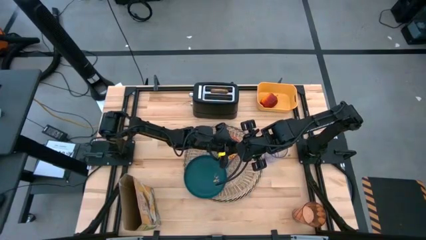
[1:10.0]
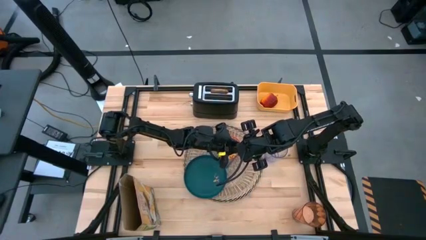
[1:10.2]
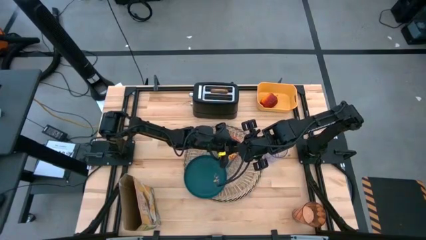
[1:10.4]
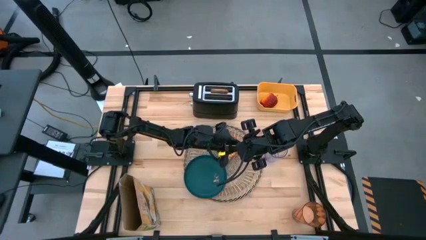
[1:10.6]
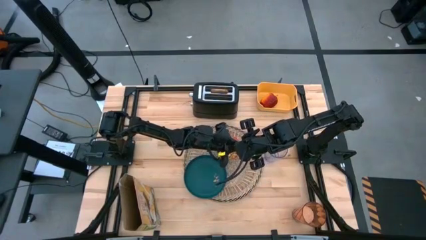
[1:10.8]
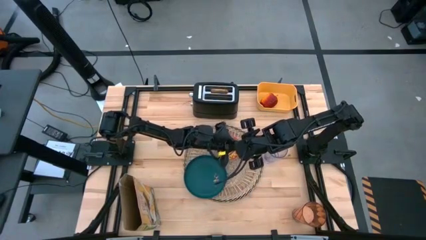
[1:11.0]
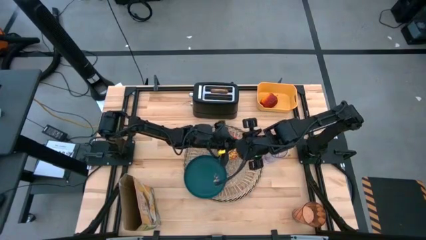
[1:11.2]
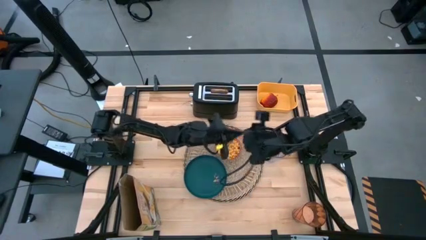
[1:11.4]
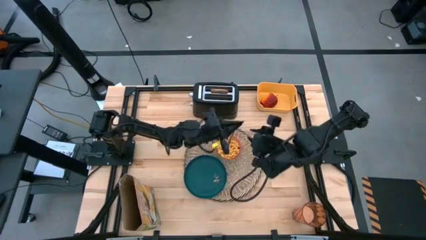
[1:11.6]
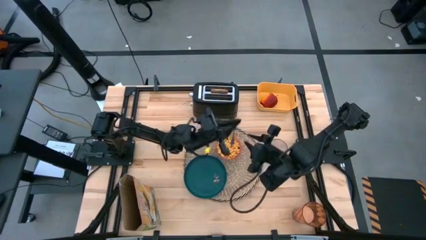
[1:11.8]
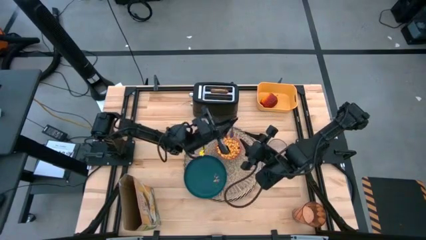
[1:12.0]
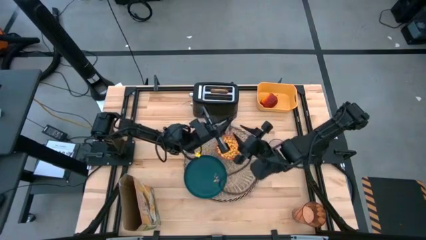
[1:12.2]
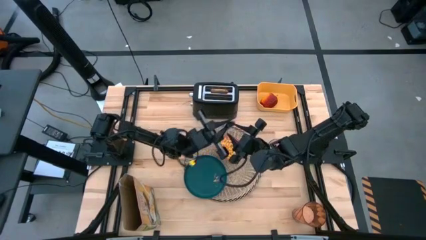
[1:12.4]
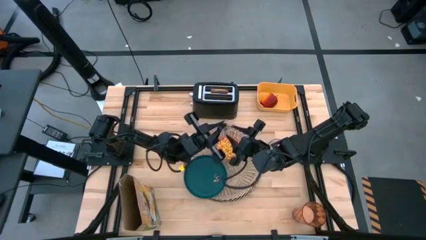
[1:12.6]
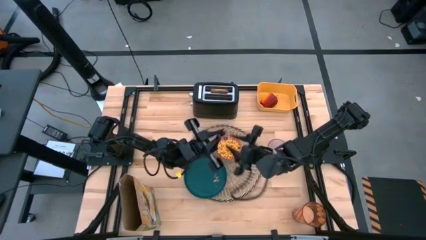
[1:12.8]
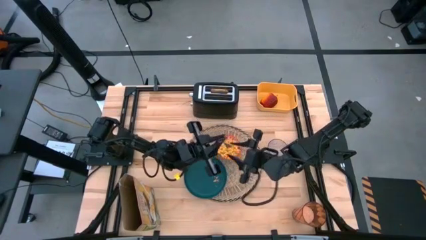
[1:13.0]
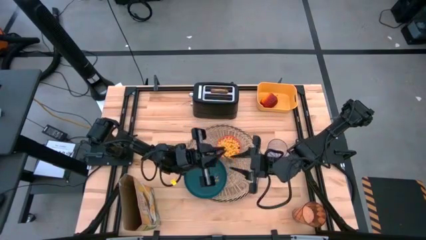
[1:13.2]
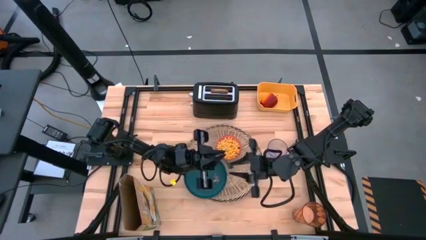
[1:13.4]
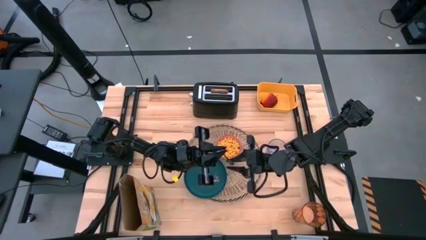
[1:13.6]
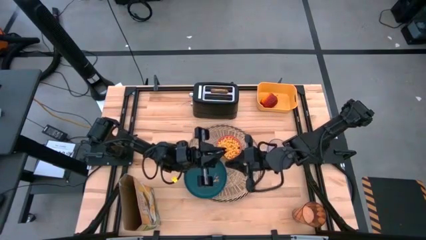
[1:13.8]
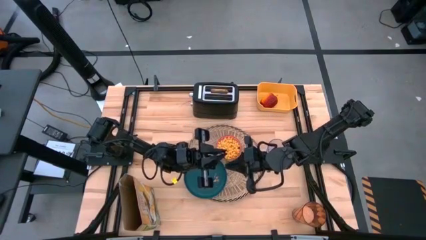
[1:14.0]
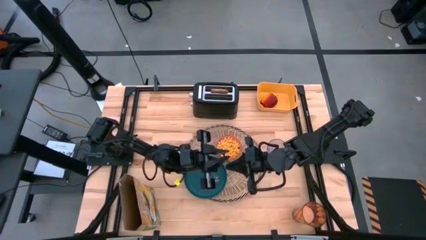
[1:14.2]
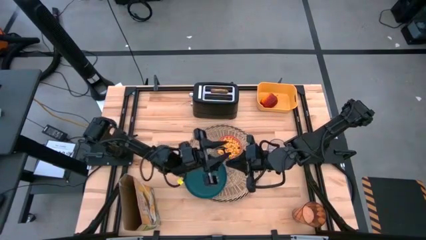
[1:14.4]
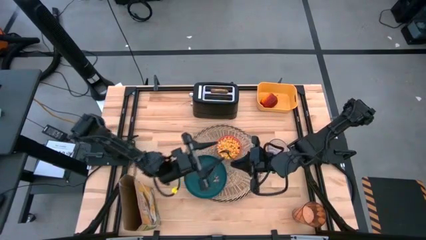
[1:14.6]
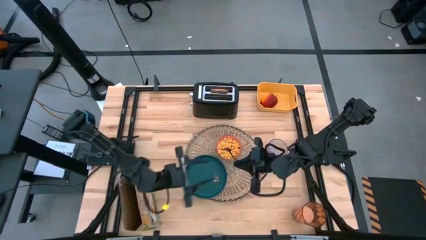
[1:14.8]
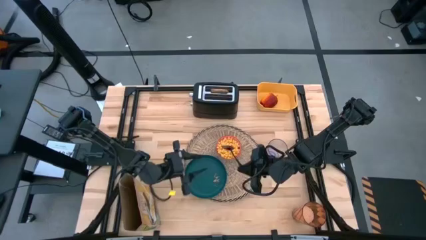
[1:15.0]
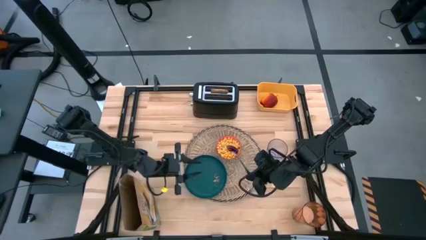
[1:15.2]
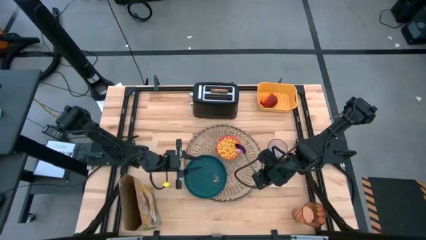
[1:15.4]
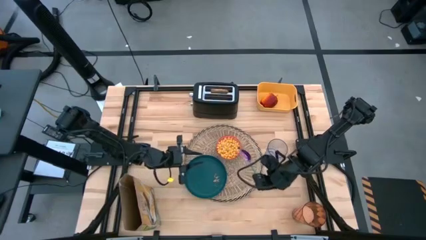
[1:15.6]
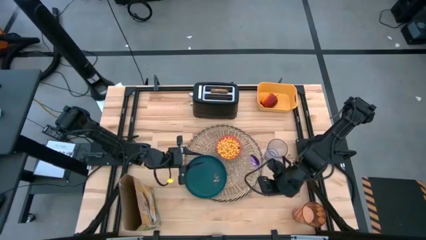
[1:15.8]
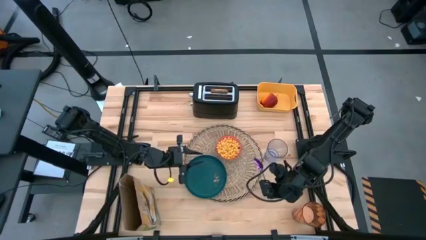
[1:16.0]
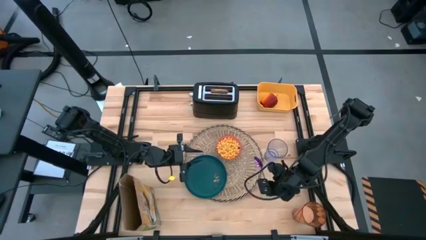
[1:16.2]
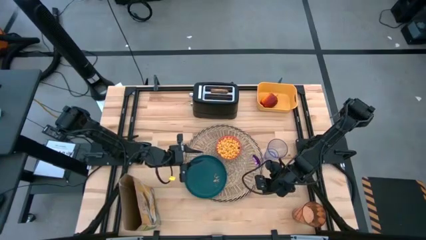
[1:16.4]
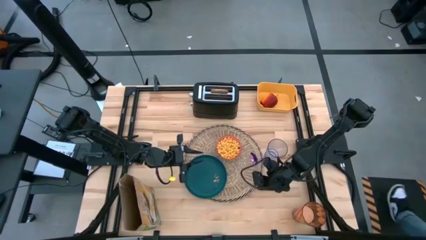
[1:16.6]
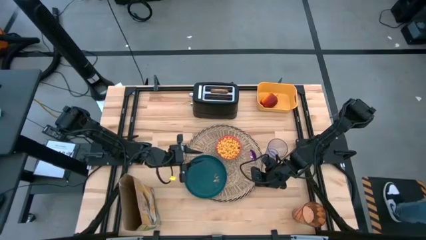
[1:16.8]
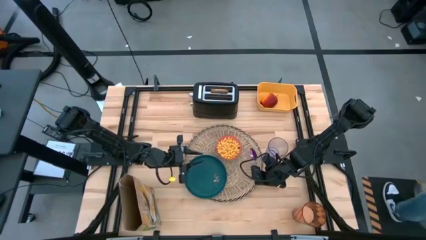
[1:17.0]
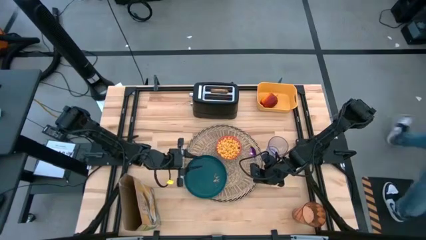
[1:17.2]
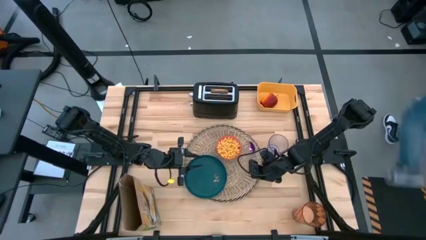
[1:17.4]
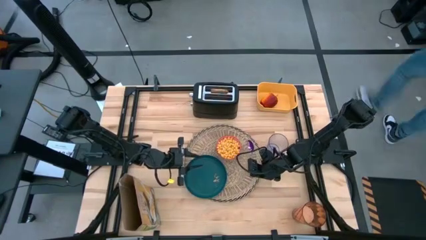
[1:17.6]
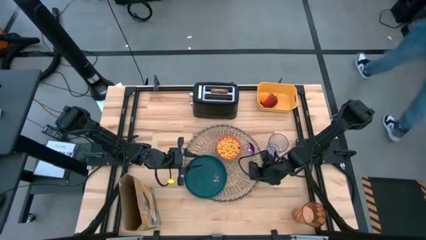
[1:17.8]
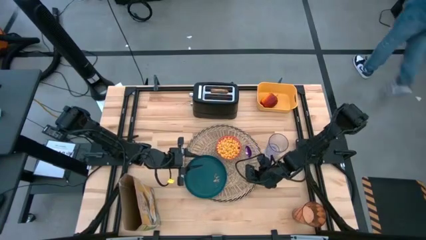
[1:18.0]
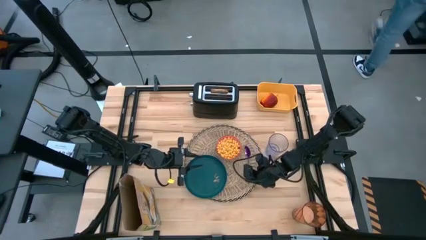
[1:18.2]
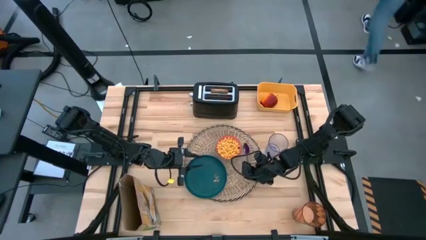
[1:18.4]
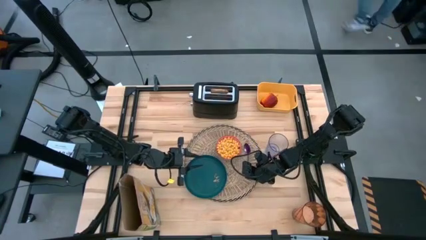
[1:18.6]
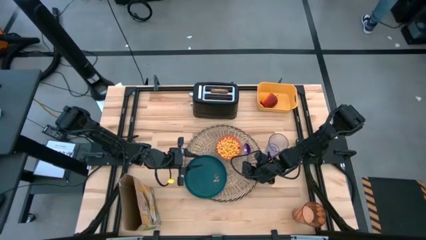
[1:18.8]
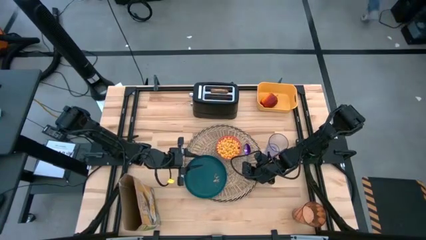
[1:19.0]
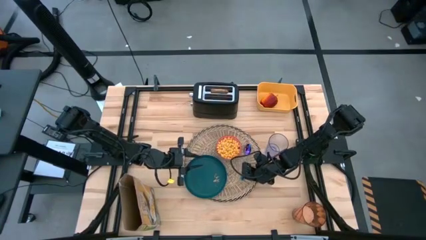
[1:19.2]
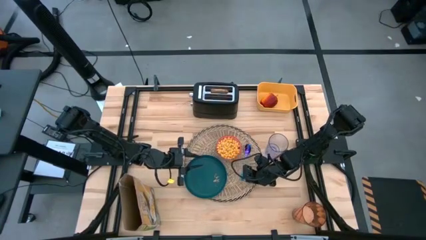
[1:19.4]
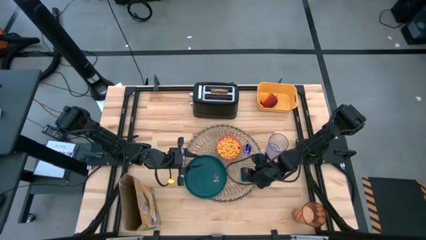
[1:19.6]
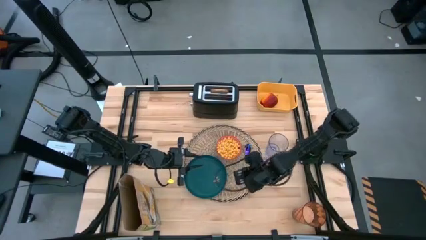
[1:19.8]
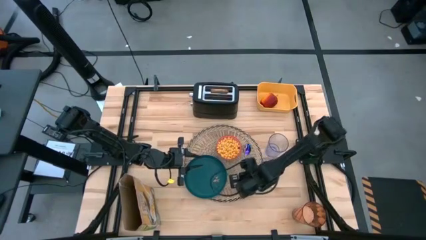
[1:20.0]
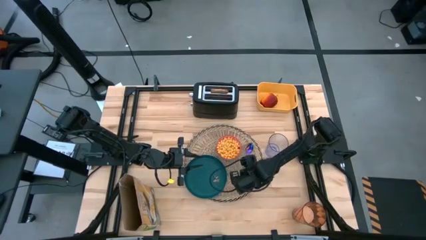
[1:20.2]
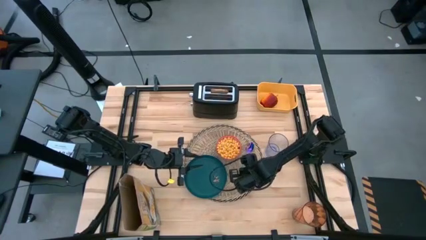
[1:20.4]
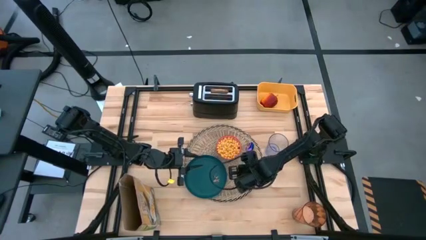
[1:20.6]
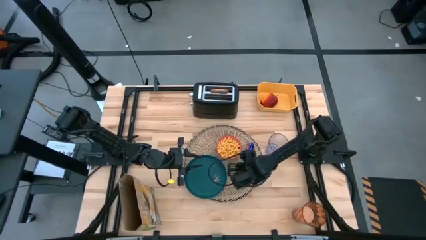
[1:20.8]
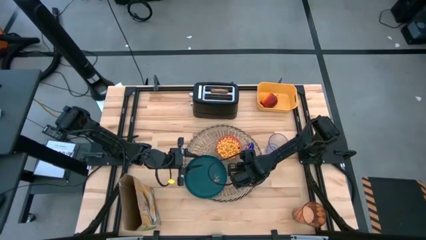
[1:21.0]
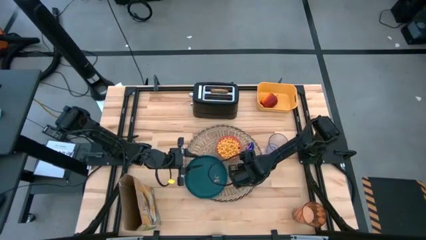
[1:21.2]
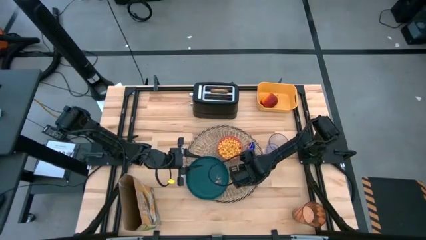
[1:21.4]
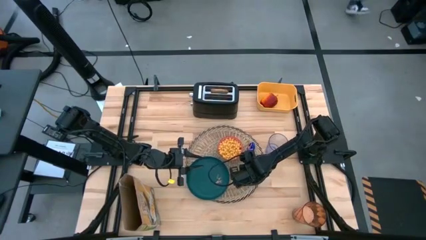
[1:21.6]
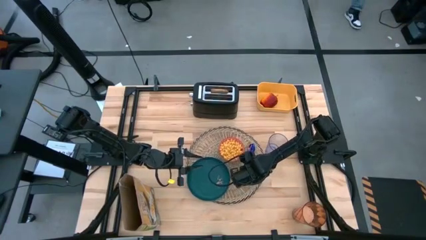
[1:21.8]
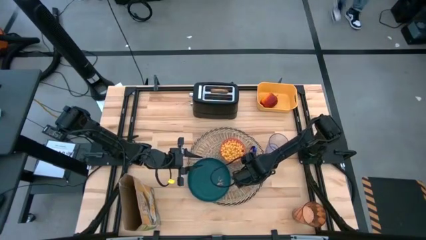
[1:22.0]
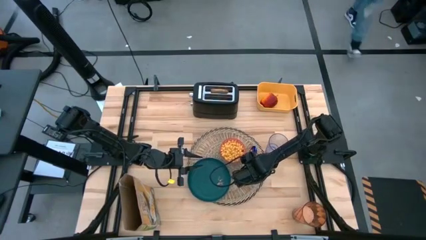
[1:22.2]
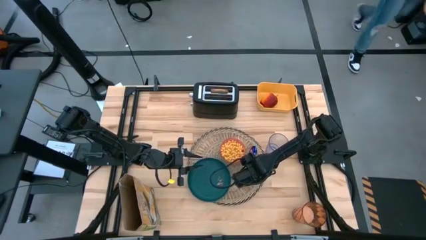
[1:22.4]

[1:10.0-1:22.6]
Task: Arrange a breakfast setting
Put the blue spoon on the brown table mat to the right side of the red bowl

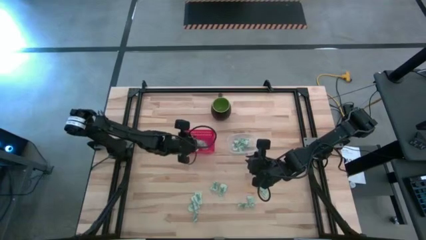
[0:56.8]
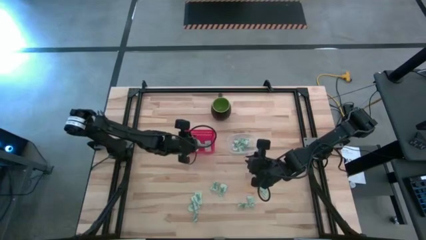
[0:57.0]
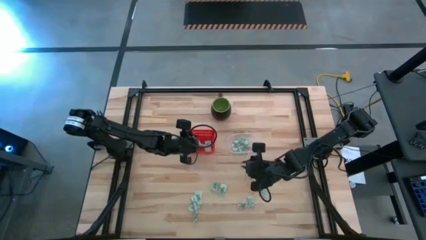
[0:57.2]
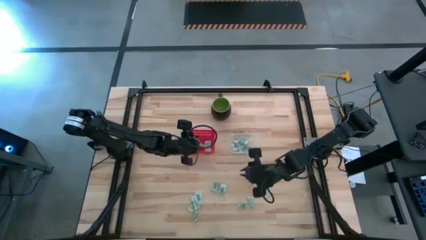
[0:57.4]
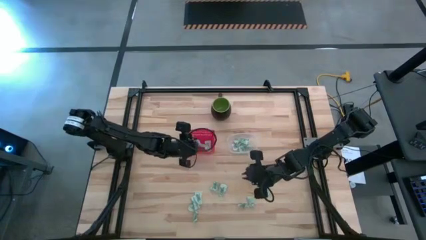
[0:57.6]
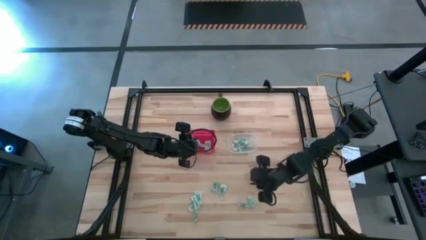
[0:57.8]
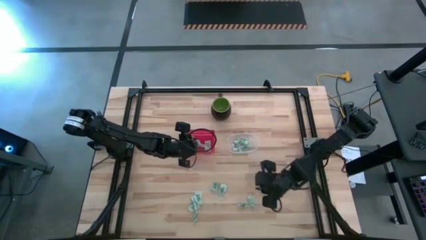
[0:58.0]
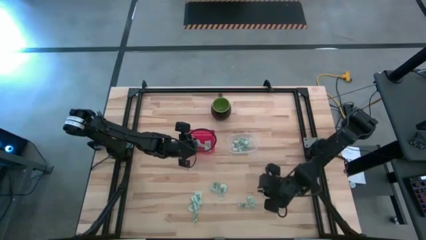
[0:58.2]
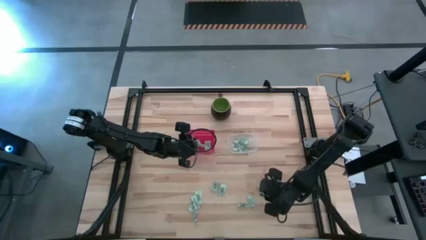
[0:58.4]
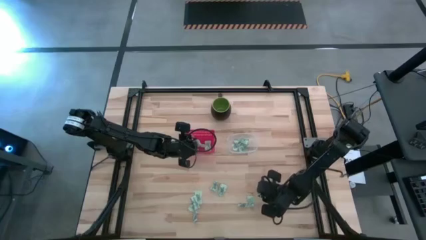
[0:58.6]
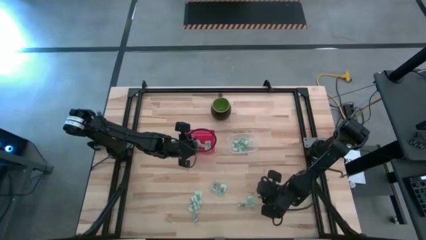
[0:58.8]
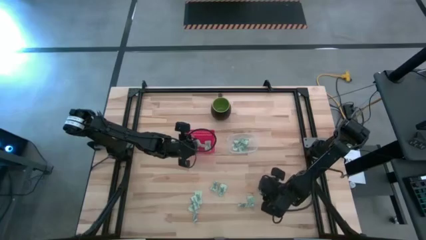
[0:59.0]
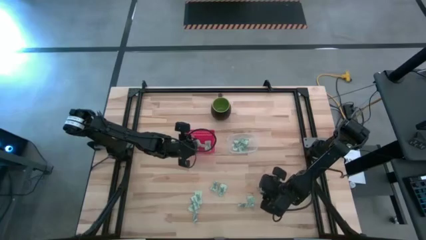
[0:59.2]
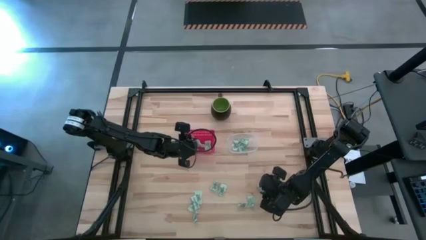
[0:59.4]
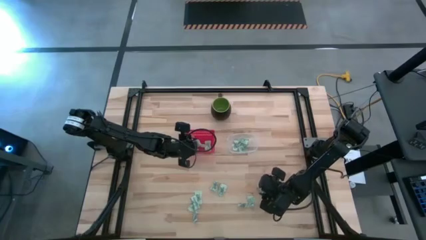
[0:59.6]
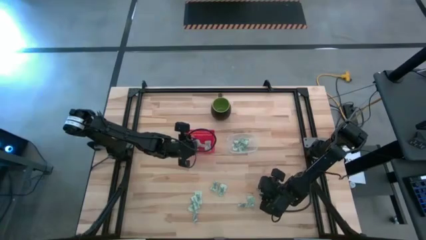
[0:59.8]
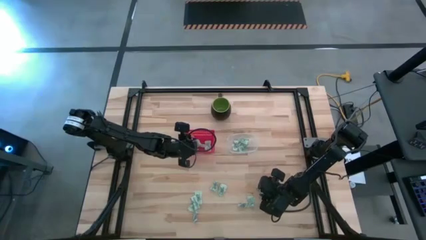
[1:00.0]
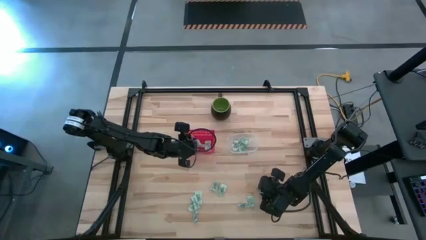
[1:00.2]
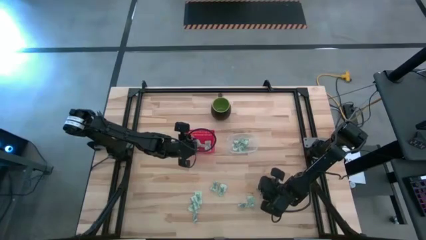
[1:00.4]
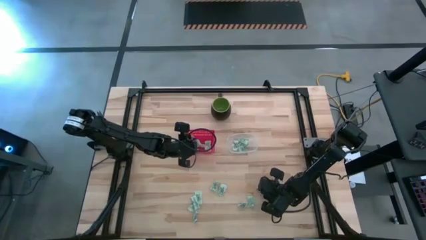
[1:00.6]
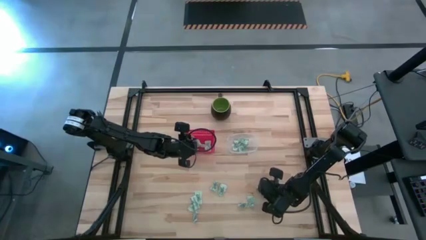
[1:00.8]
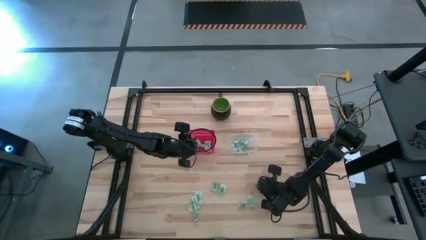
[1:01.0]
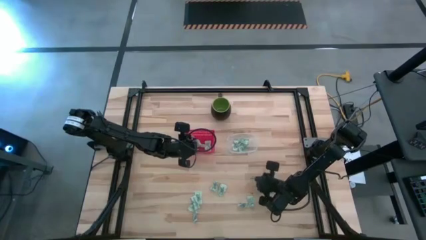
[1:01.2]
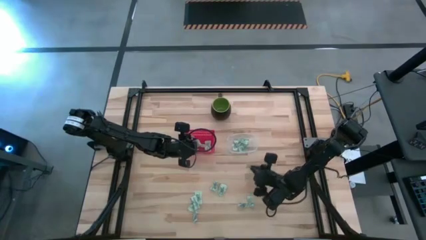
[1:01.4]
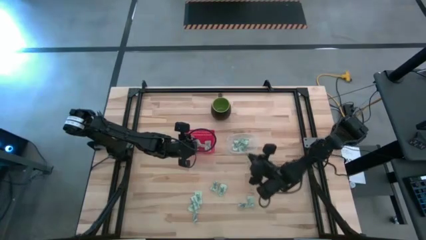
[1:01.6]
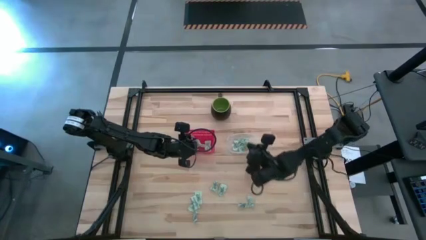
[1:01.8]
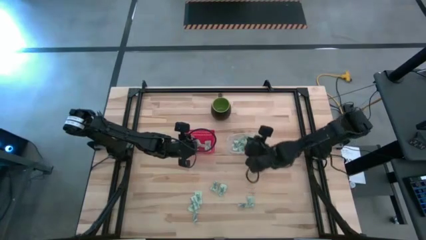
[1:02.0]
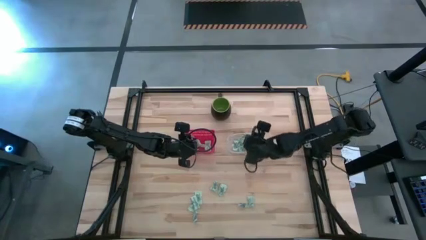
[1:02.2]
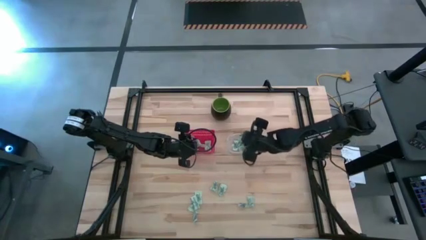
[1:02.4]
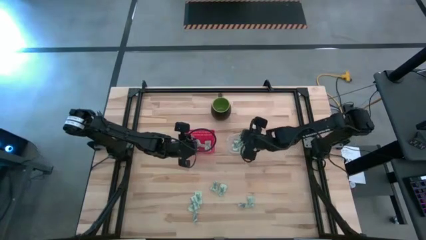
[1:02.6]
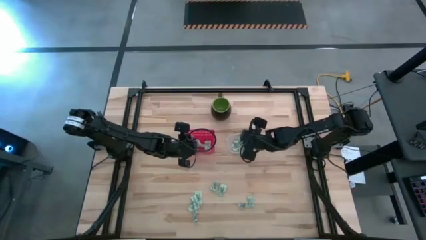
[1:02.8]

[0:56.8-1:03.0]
Task: Pick and place items into bin
Put the stevia packet into the transparent bin
